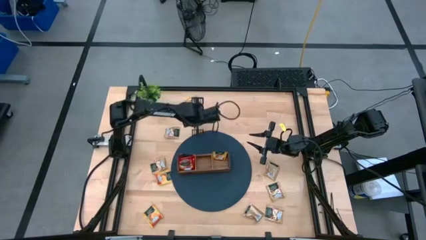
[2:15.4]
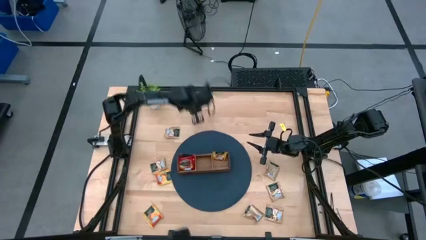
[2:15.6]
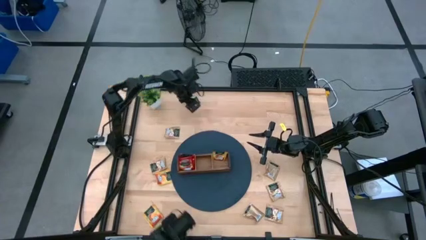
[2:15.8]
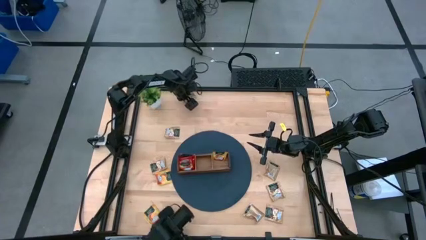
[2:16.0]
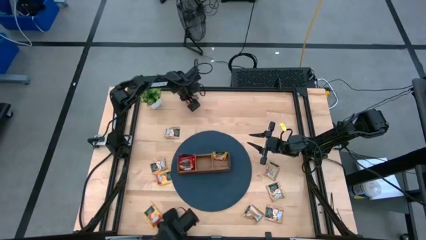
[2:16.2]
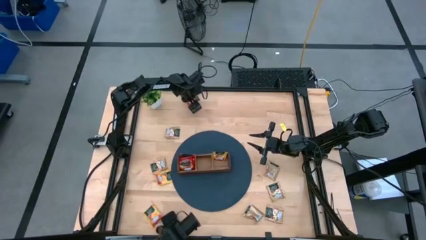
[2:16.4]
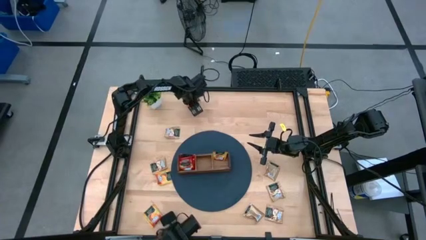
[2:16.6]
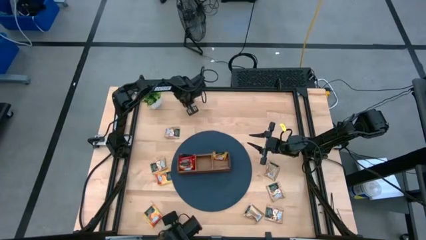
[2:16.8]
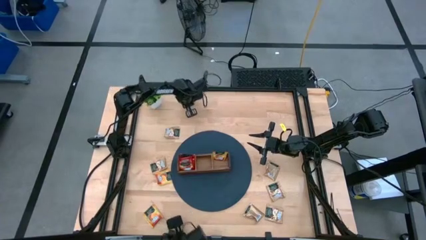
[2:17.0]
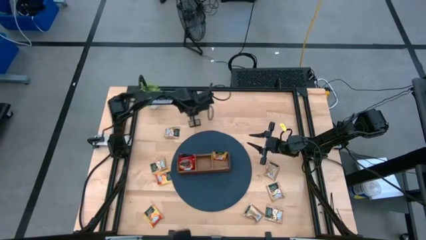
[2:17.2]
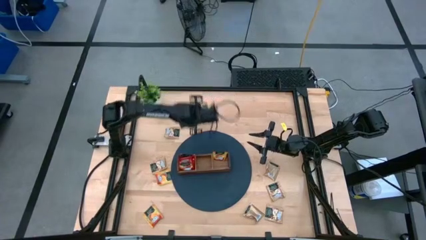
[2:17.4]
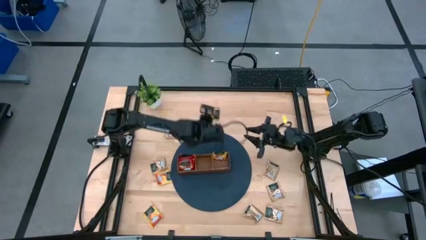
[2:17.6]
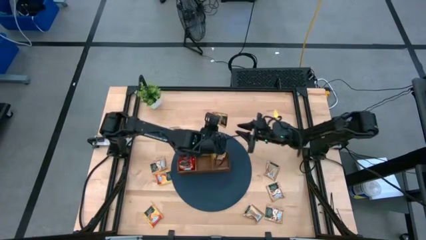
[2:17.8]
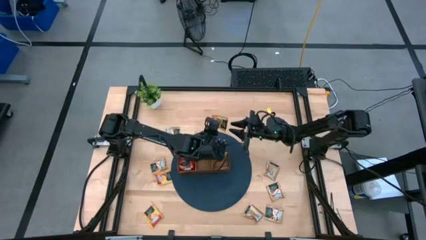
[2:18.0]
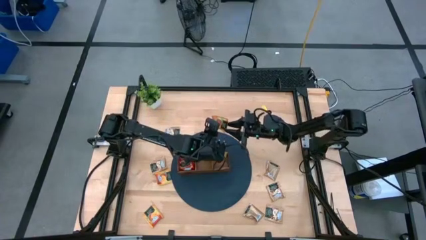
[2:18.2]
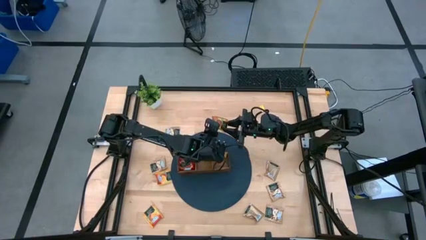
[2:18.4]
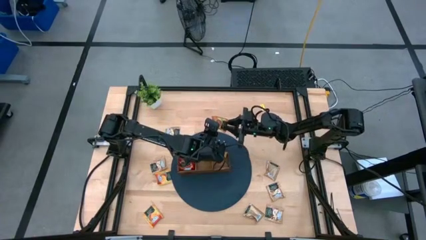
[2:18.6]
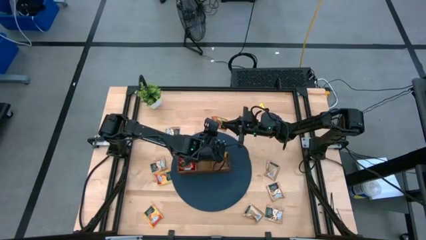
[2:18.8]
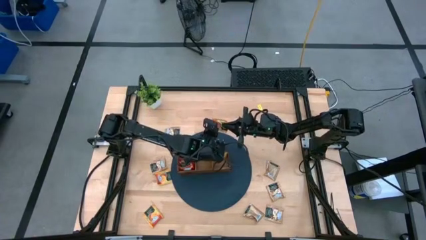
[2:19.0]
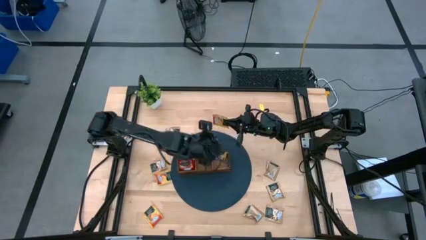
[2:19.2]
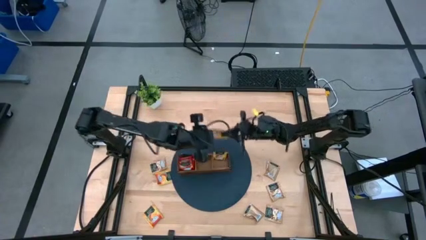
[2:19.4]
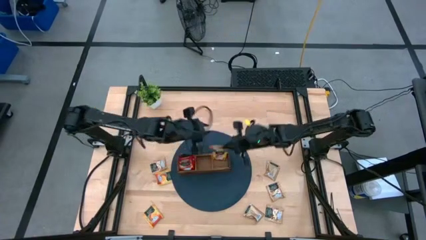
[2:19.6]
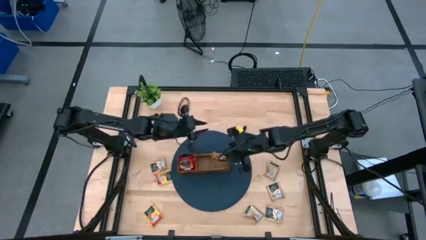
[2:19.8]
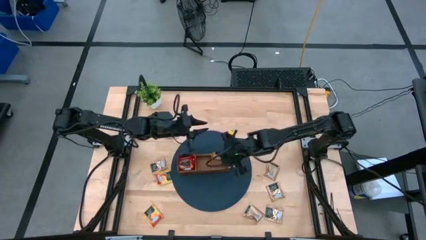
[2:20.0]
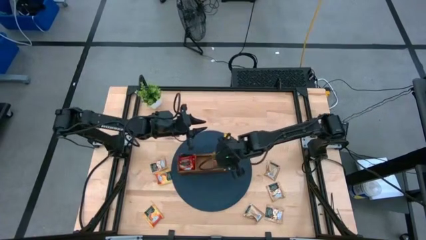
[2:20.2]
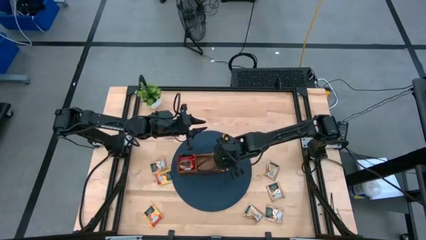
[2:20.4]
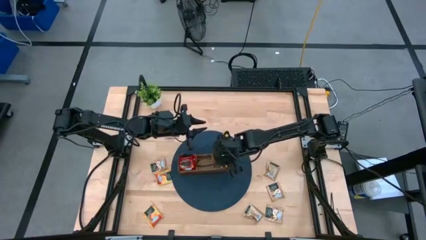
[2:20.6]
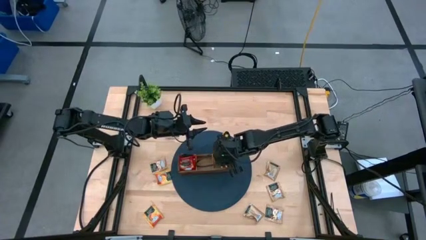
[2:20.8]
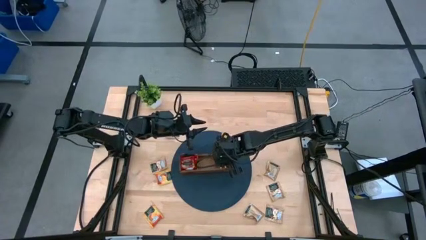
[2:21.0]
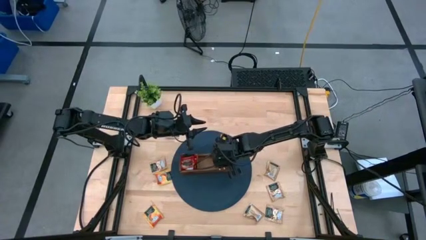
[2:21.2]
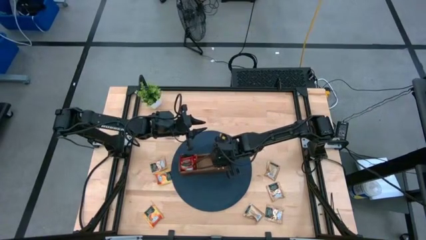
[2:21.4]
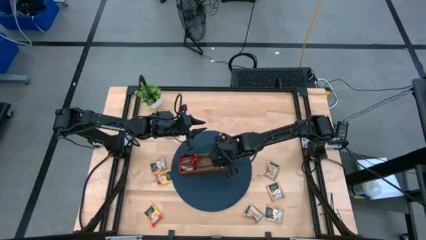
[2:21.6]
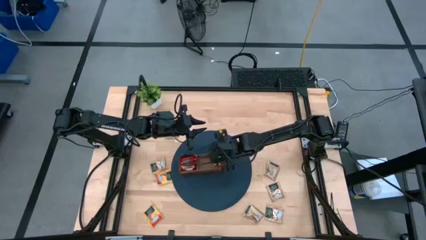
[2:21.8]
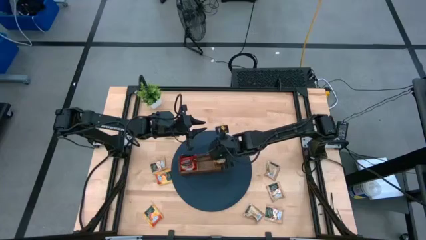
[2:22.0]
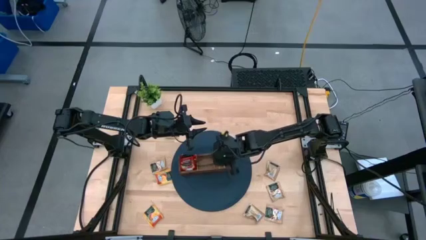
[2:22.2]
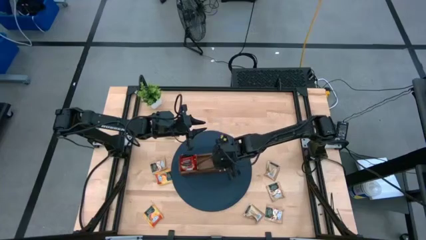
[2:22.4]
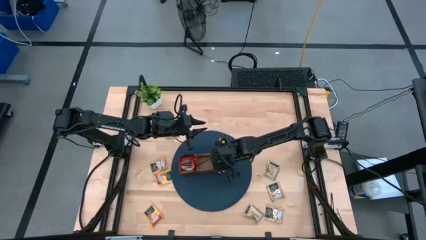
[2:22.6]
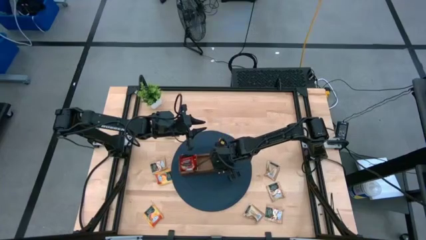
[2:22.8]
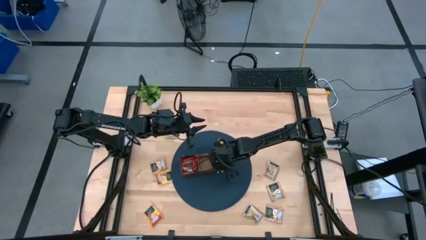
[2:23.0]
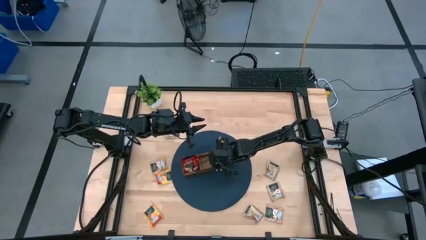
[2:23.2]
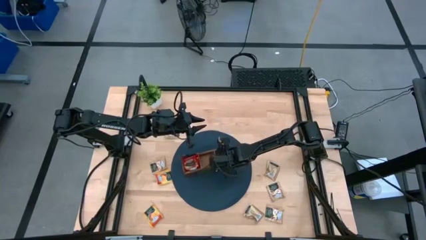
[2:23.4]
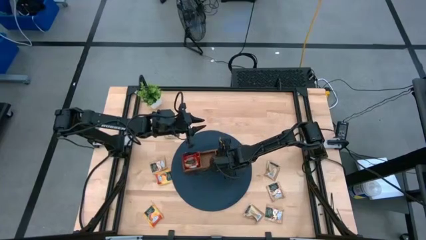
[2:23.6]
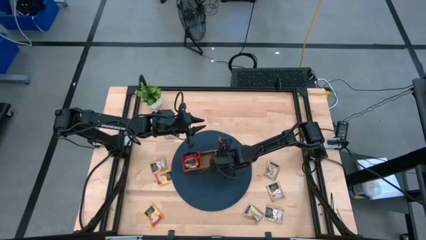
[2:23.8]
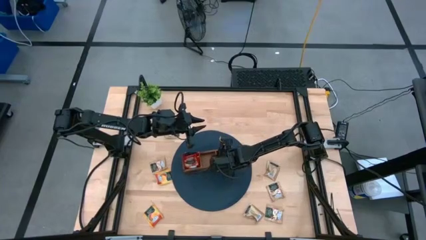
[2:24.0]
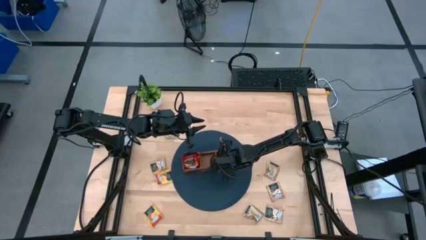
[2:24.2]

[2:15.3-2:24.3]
Task: Pick & Place Tea
Put the top yellow tea bag into the right section of the wooden organizer

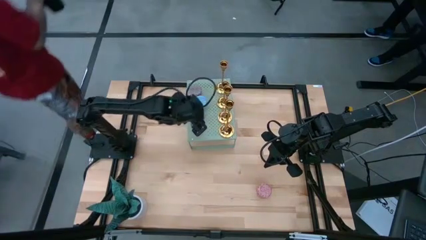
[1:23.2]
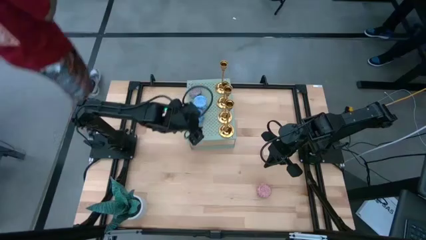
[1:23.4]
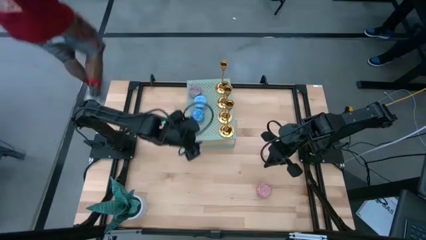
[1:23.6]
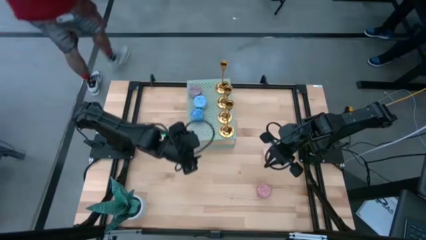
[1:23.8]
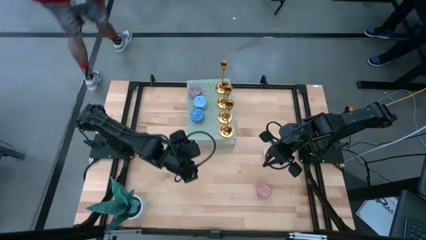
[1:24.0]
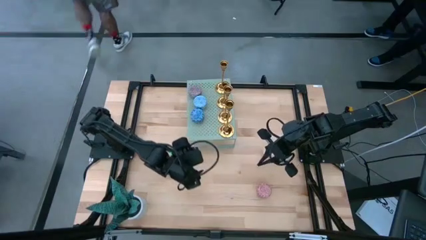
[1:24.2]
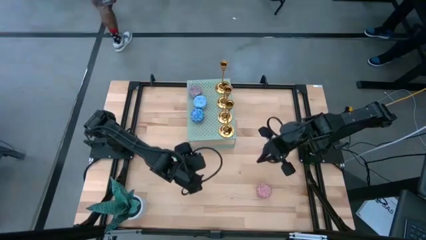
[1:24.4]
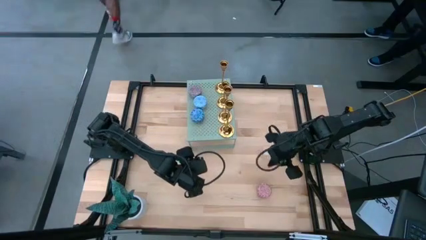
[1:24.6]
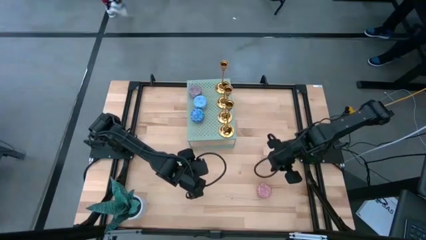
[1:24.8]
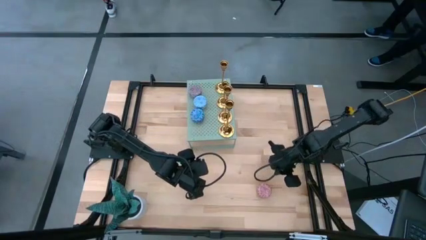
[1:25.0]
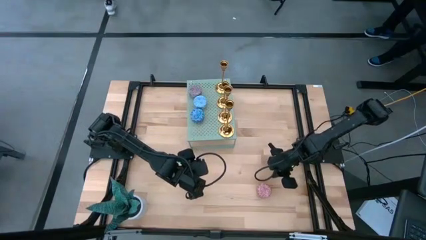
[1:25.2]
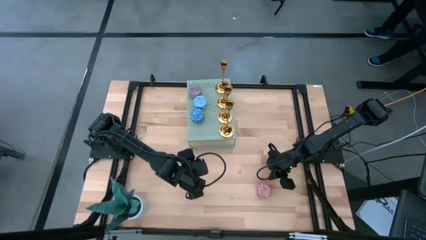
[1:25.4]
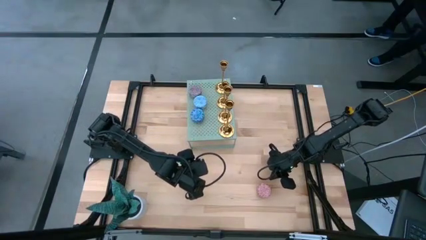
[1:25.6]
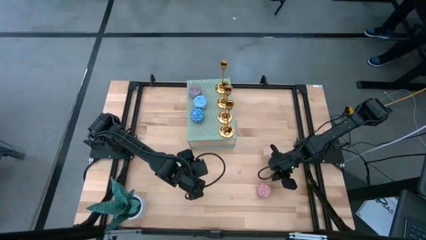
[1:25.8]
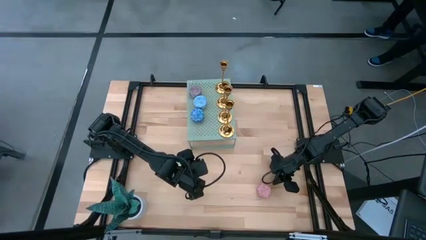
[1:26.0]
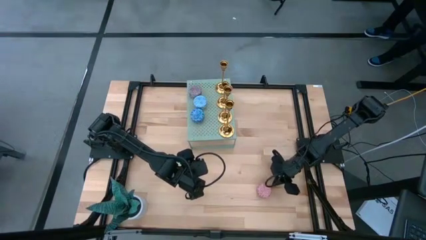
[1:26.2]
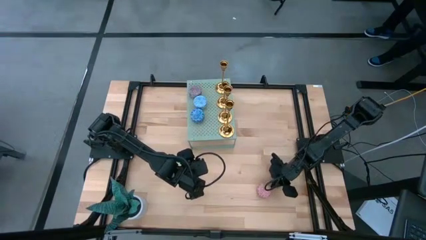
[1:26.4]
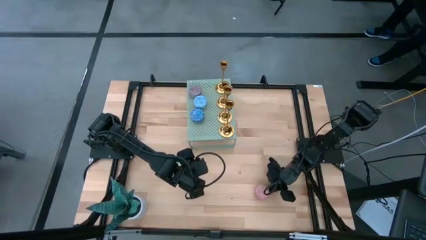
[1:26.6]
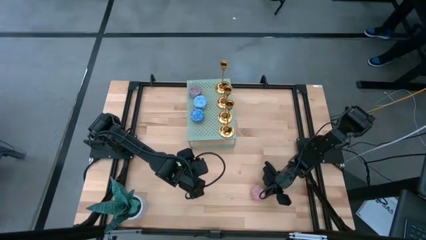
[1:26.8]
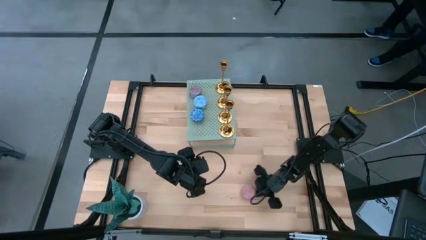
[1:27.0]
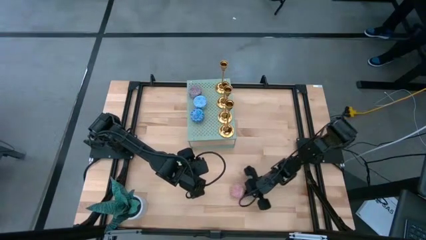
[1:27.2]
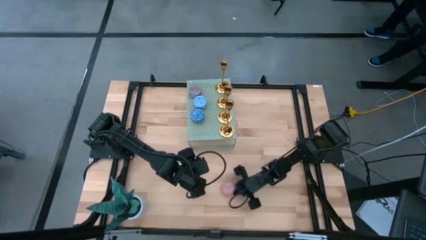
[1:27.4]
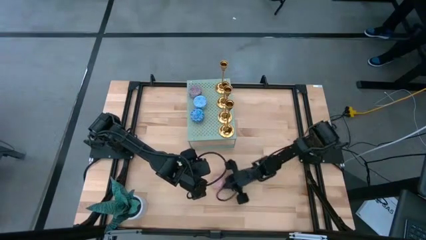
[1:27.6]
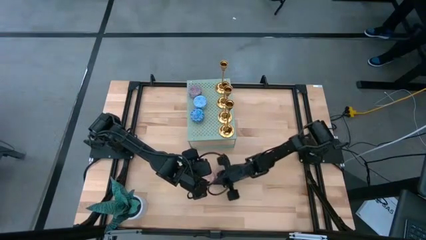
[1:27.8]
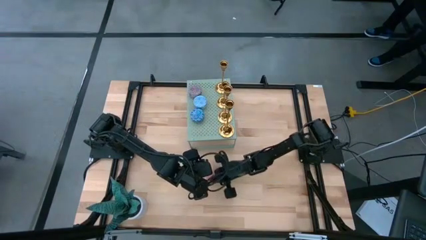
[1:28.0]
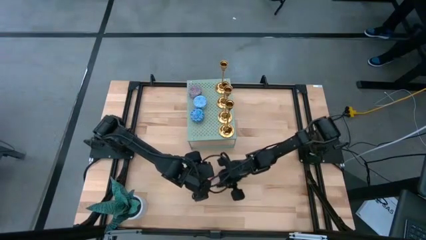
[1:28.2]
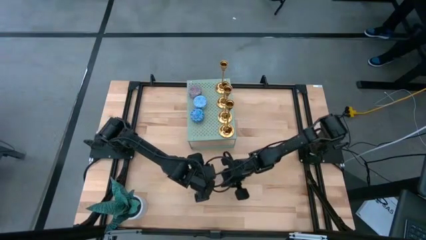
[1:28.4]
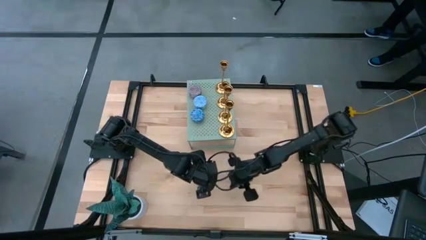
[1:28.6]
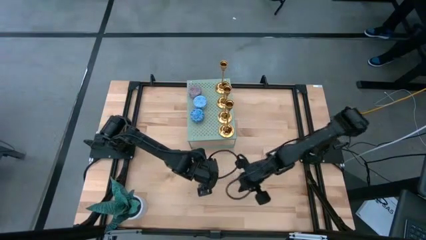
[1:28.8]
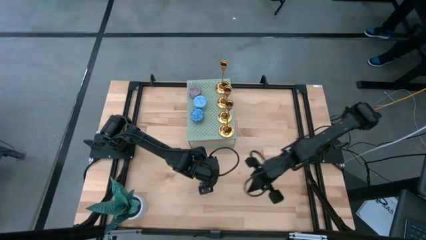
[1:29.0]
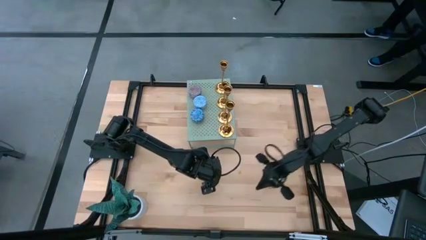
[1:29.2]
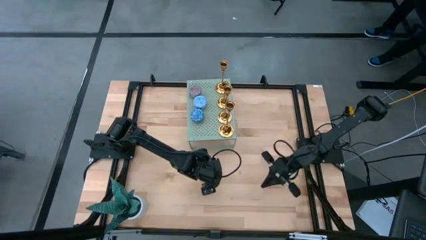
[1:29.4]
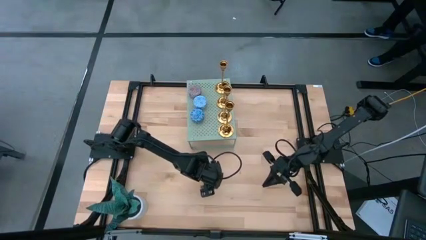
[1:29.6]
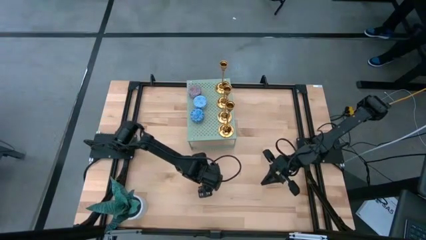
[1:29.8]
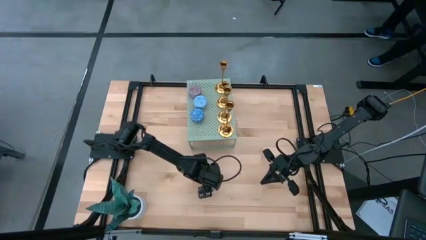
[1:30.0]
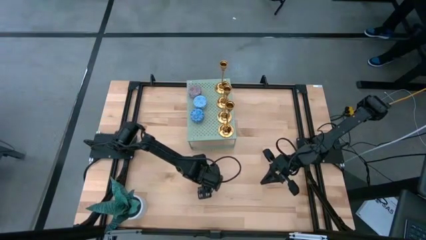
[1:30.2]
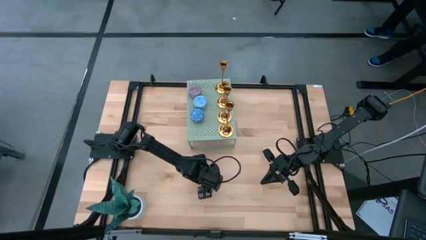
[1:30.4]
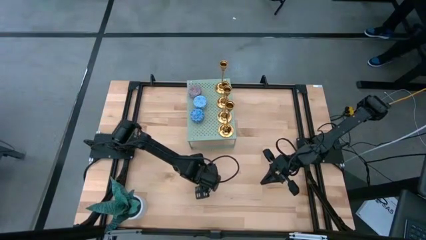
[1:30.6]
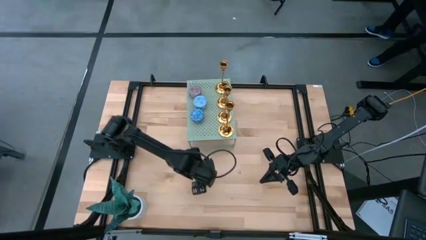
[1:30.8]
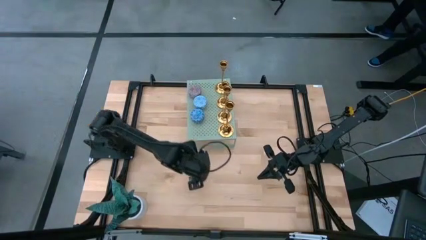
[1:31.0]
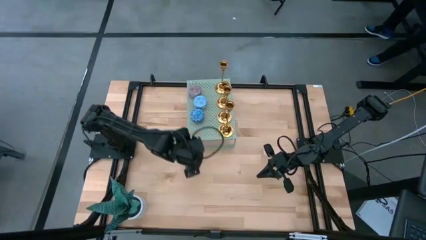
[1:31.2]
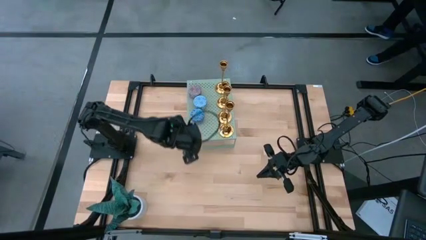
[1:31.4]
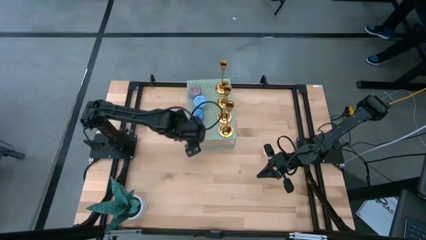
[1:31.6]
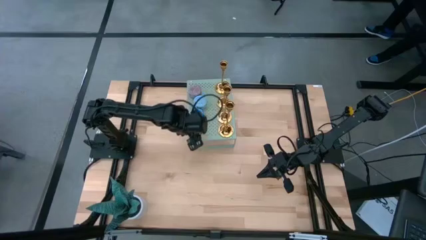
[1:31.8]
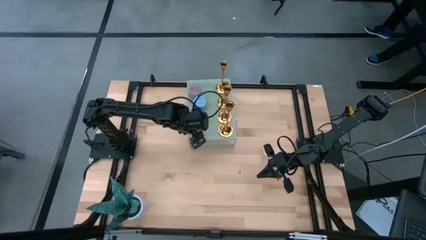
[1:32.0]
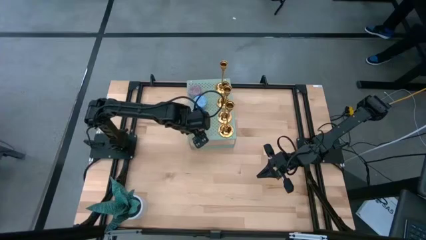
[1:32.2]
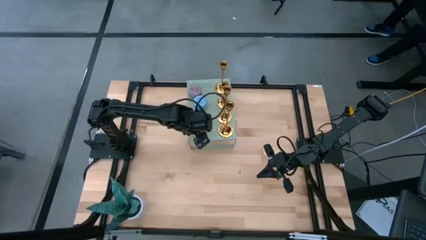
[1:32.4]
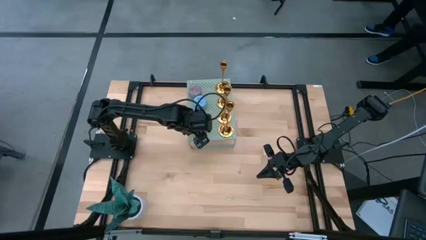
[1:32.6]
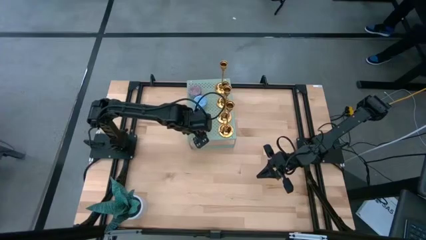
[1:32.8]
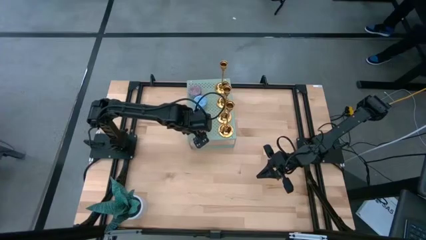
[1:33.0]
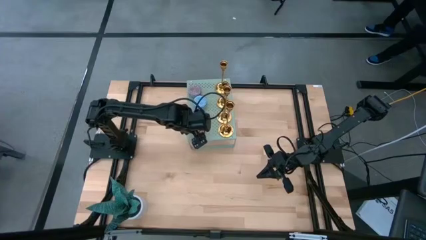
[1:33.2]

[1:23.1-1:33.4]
Task: Pick & Place candle stick holders
Align the pink scented candle with the other scented candles on the shelf
